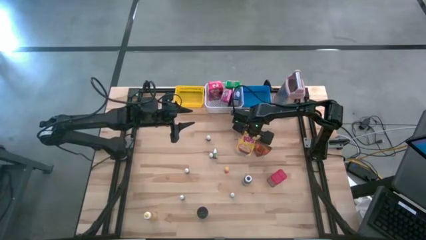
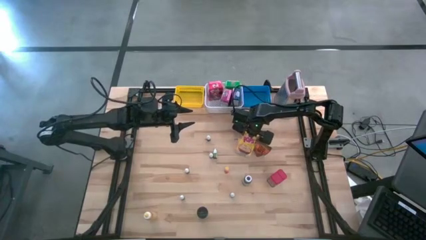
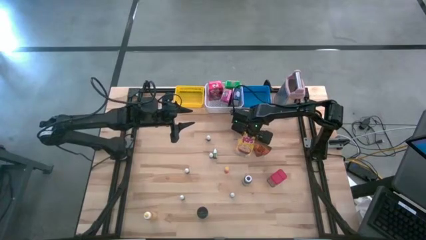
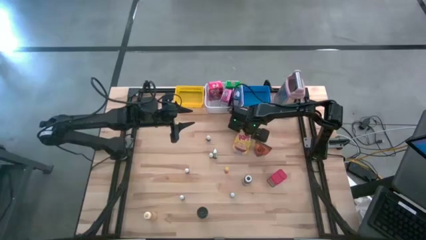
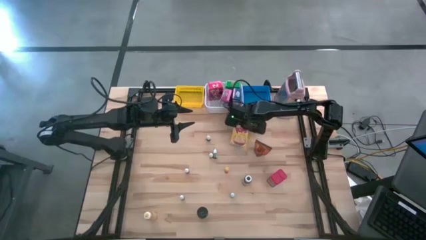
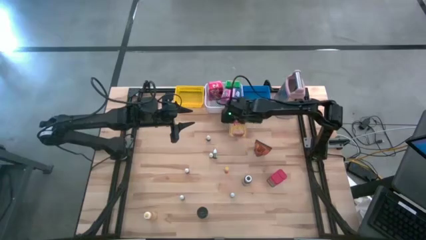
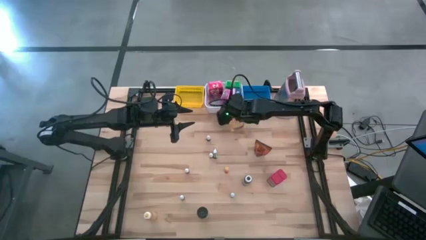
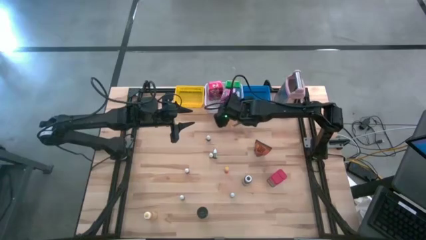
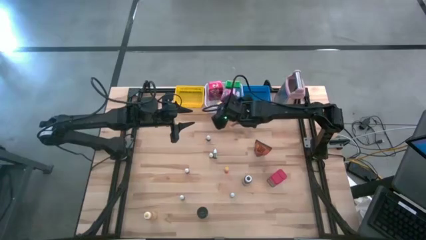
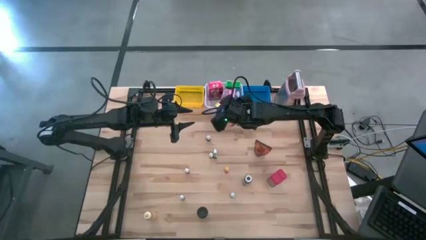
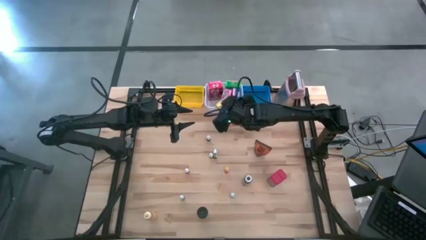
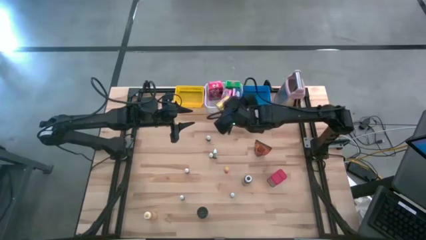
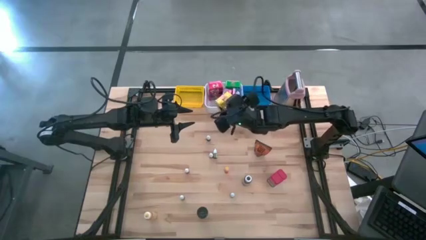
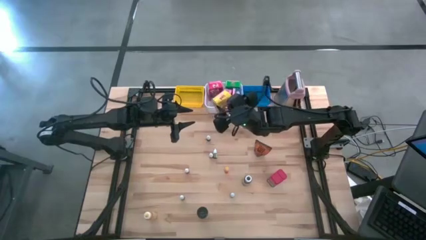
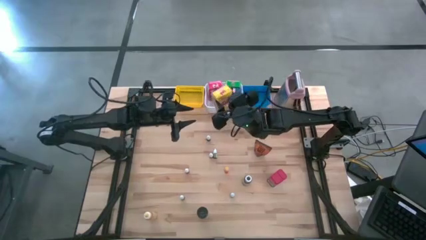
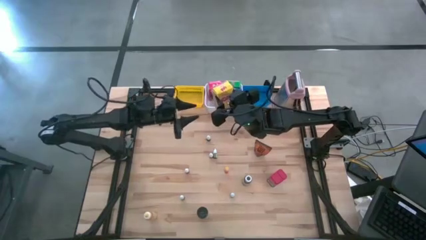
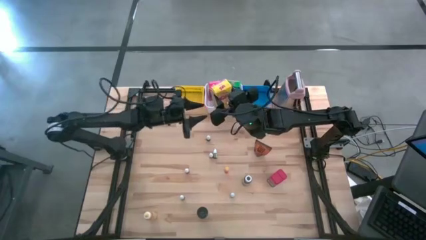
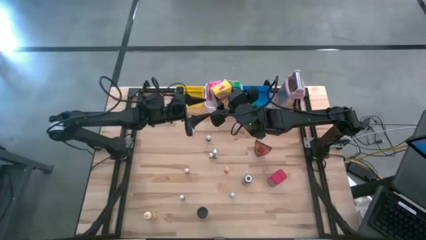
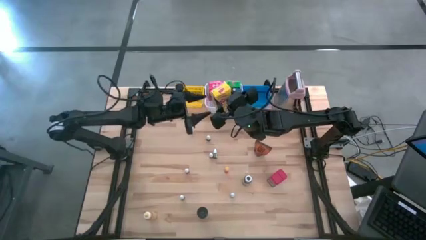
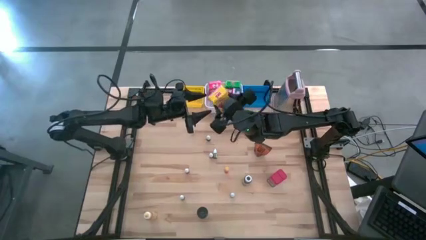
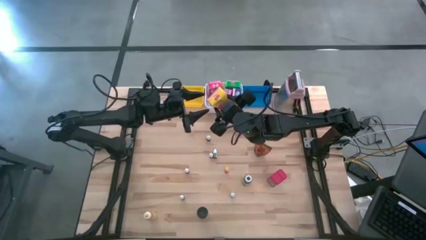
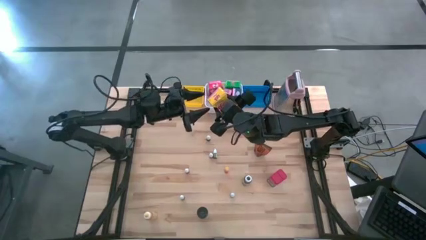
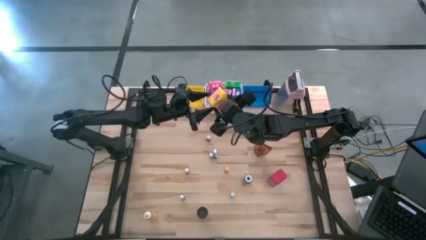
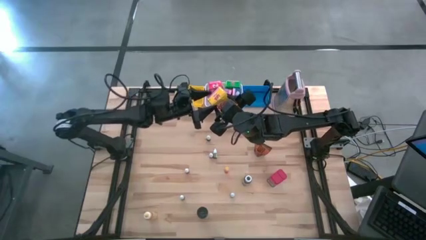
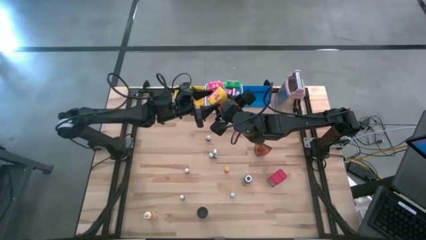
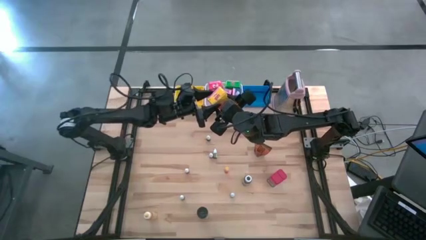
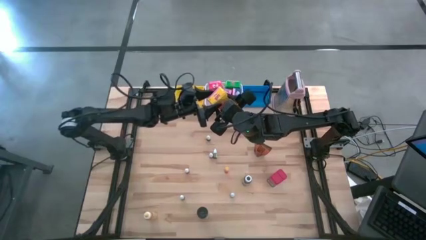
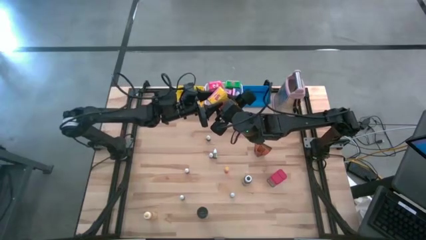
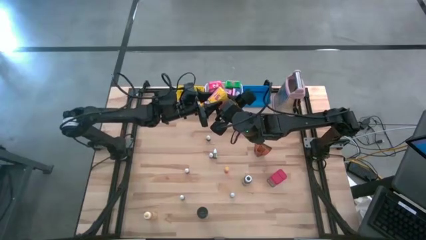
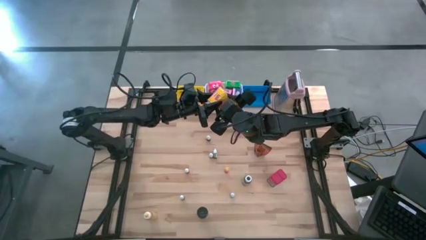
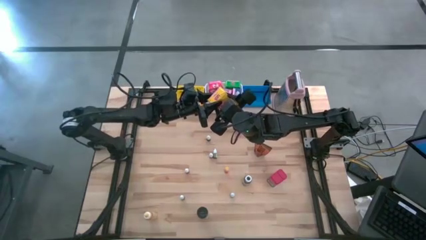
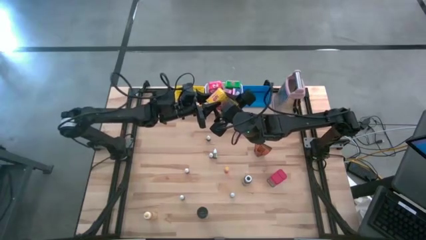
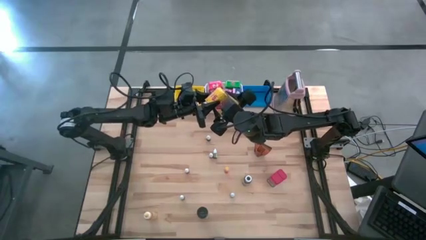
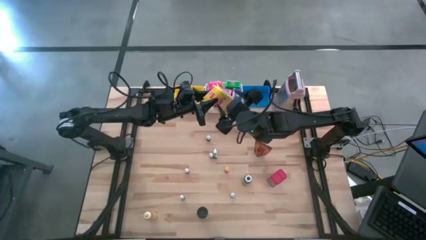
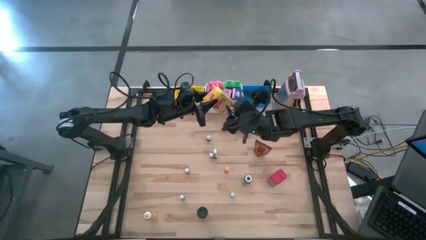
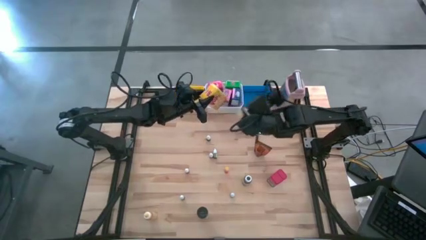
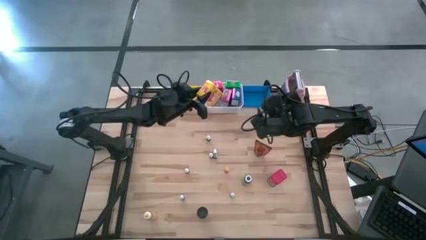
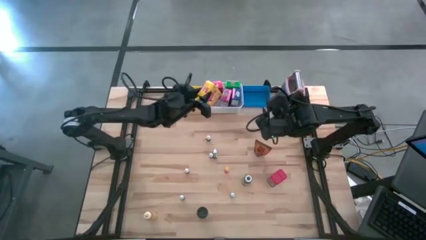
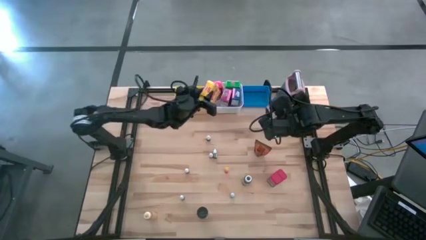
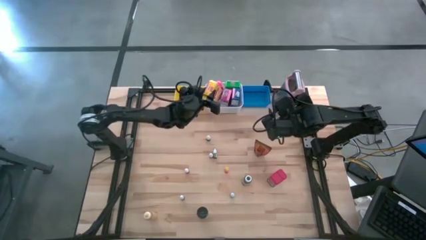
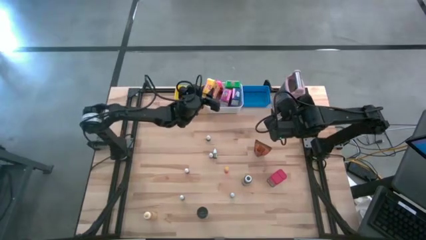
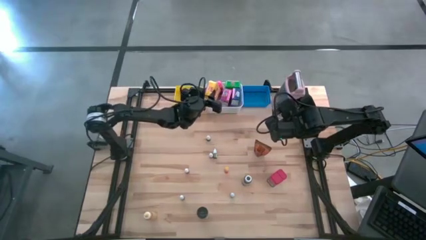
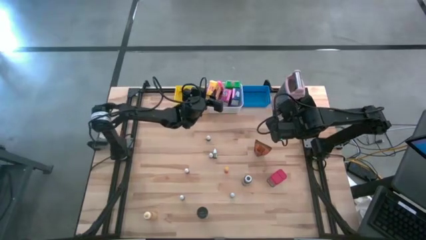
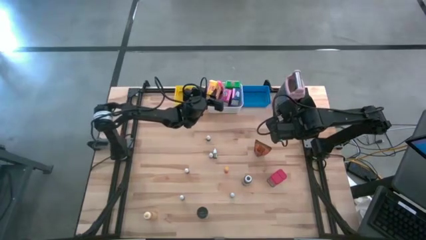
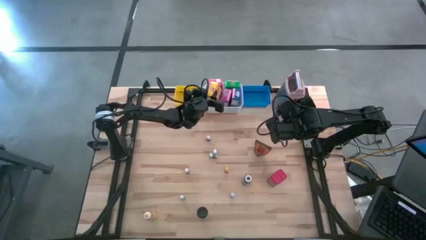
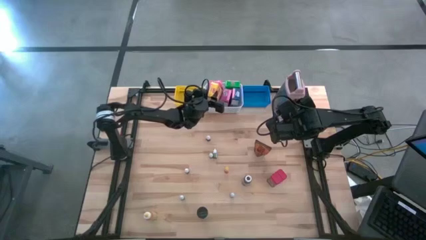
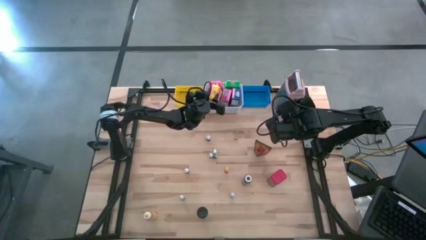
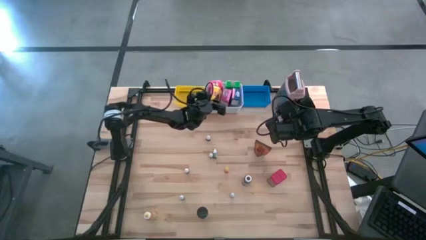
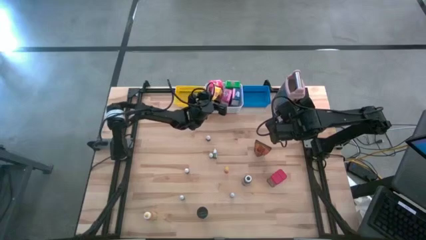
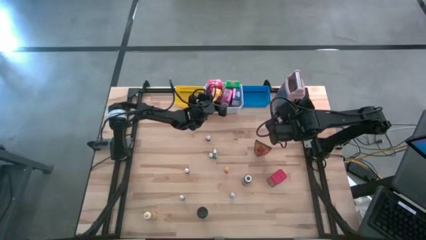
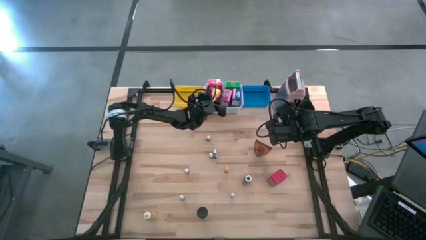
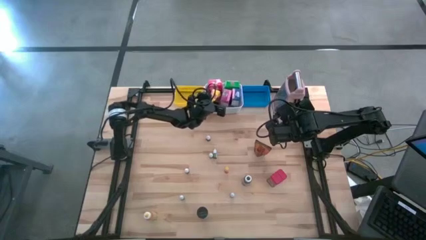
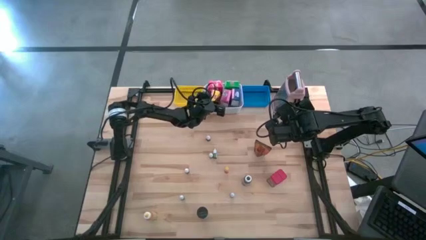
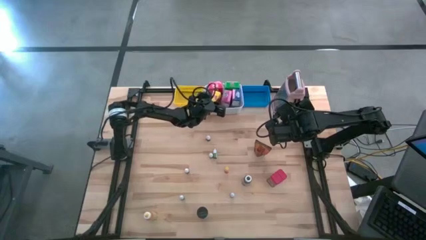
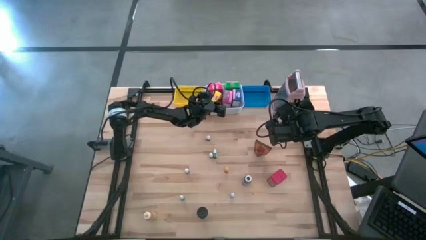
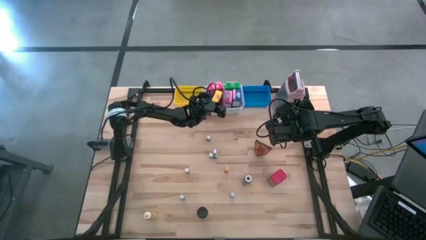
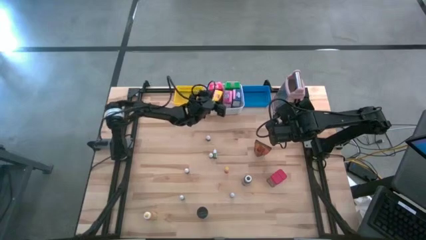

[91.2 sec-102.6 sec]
Task: Pick & Place Kitchen Items
Put the yellow cereal box into the white basket

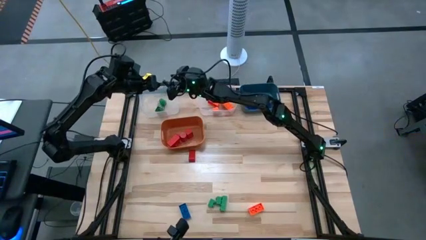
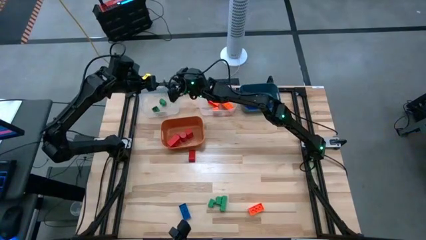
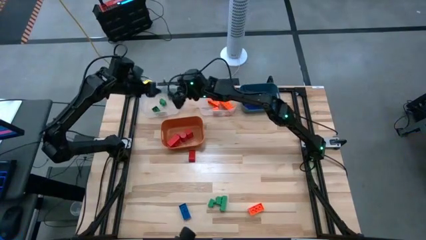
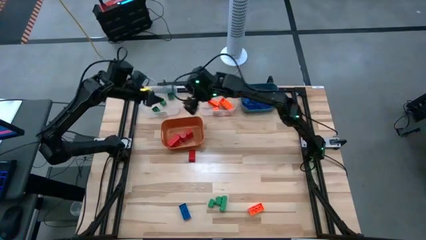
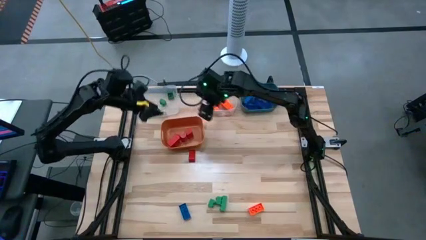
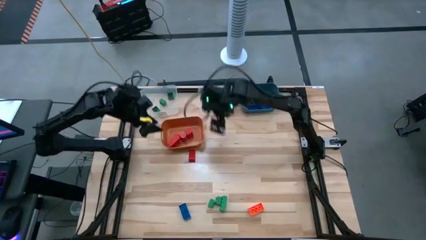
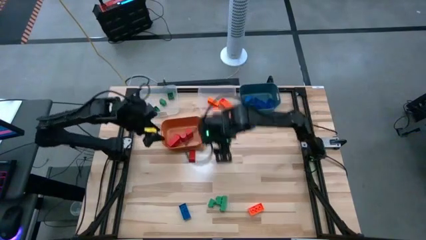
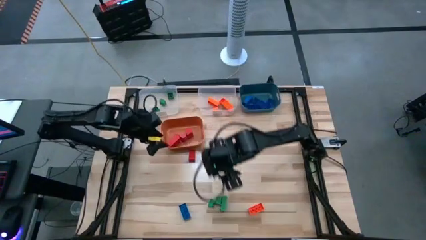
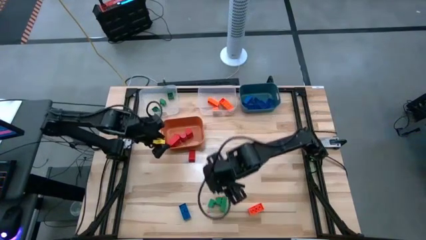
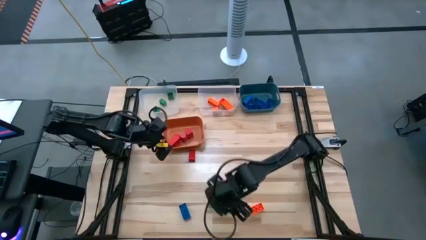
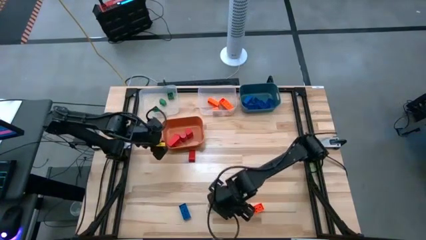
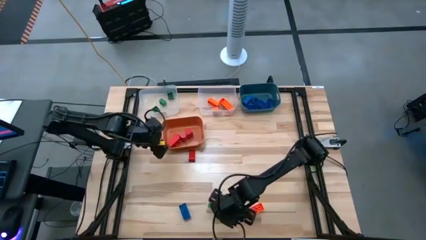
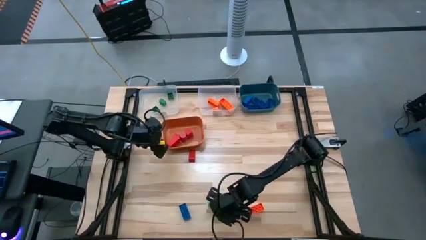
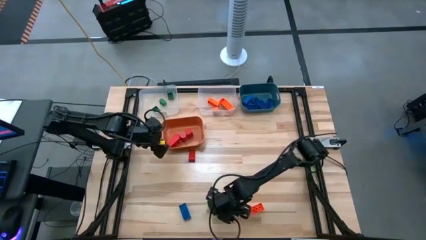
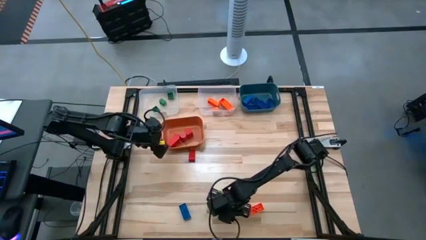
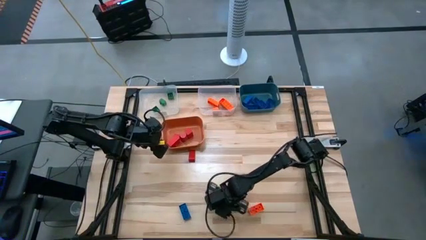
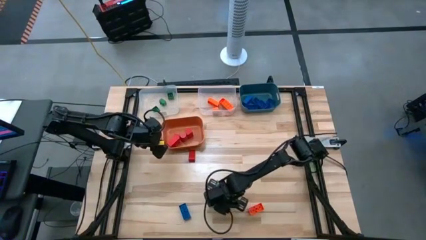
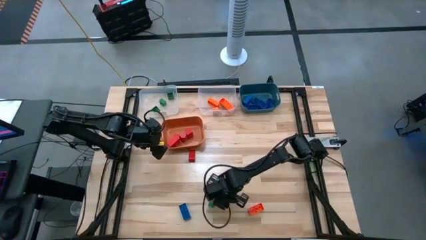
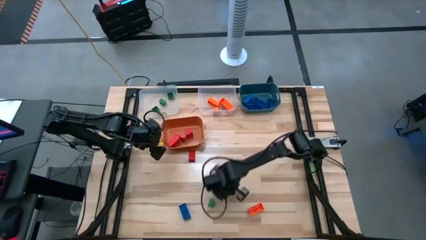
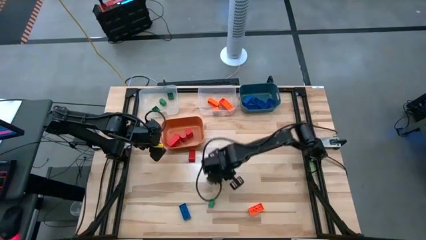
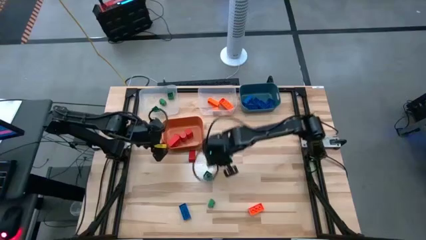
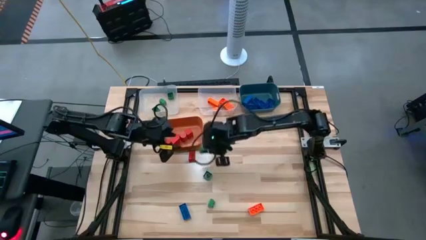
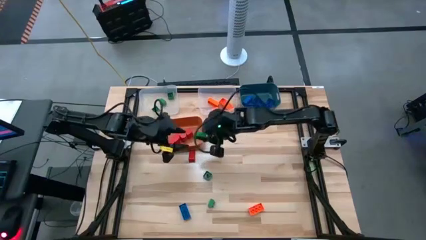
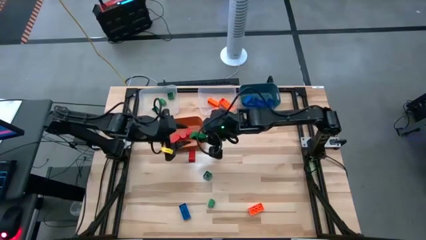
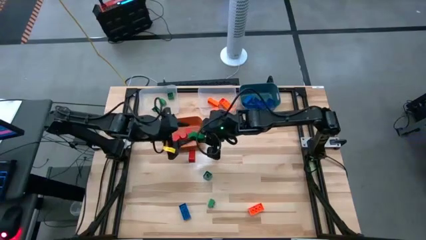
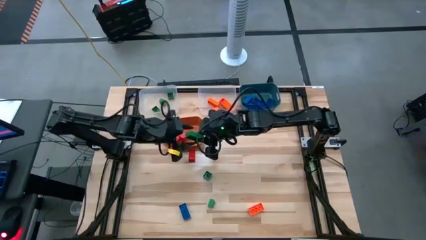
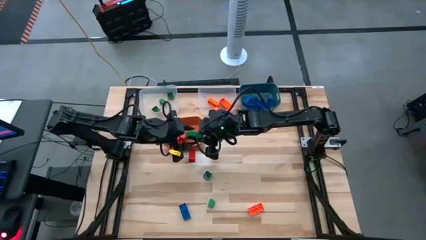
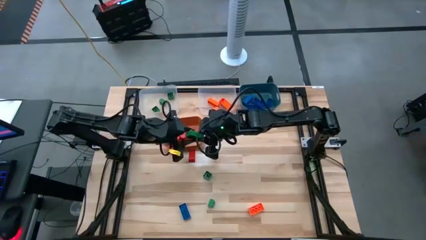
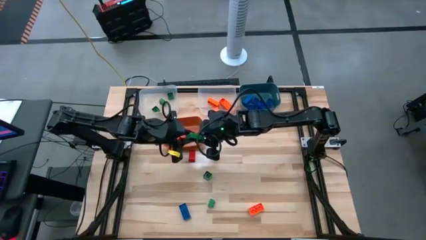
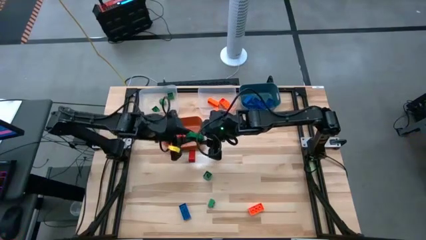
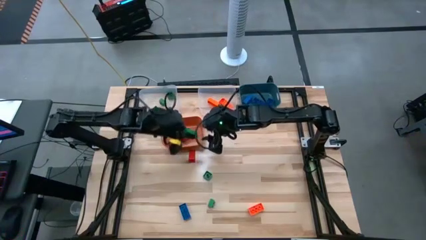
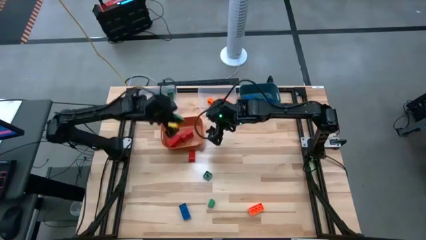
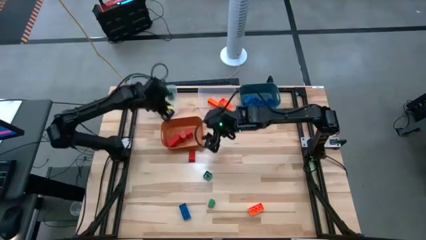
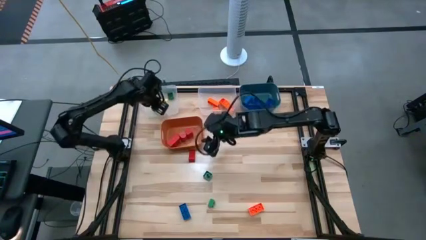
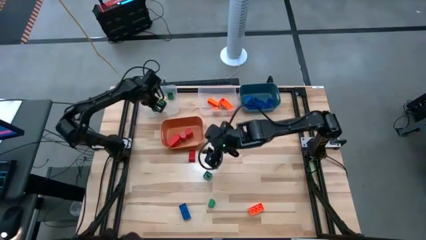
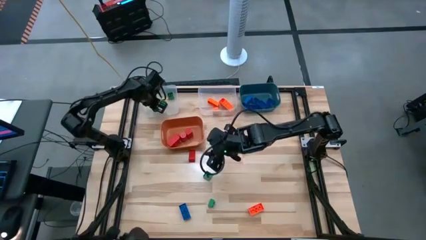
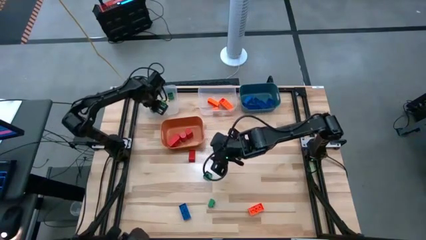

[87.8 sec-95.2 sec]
Task: Sort blocks
Put the green game piece into the left transparent bin
